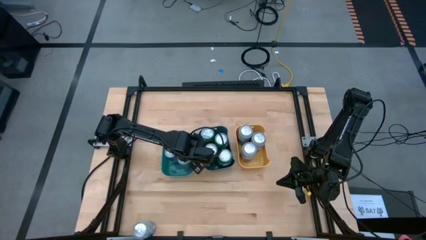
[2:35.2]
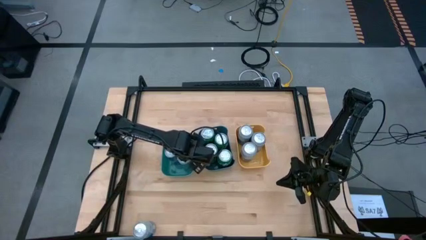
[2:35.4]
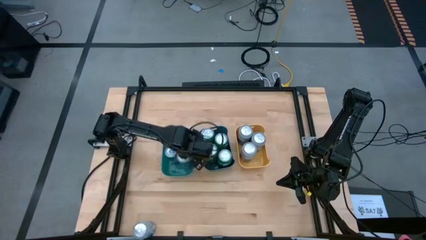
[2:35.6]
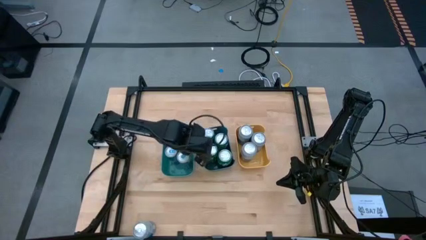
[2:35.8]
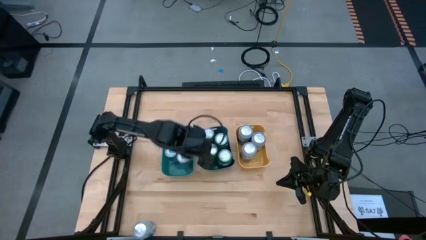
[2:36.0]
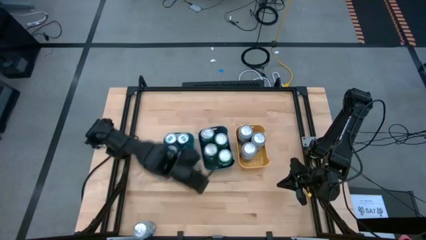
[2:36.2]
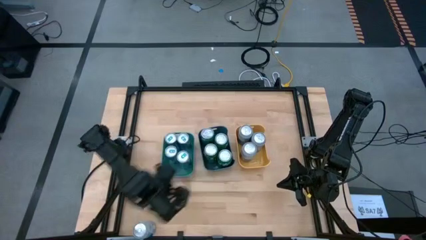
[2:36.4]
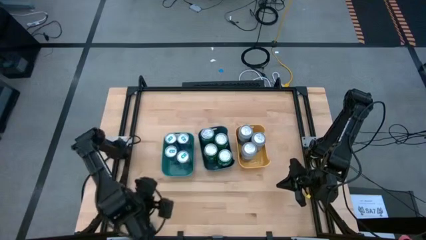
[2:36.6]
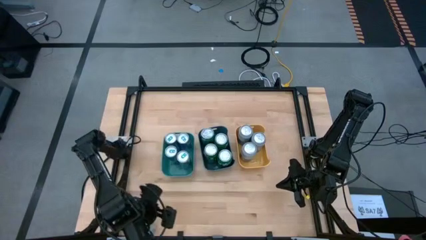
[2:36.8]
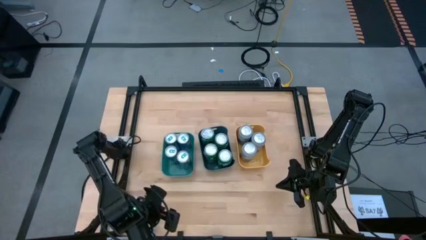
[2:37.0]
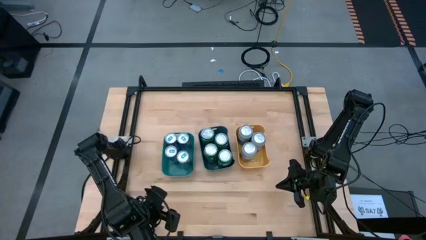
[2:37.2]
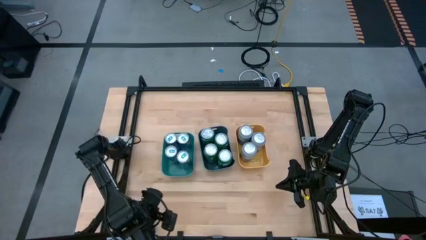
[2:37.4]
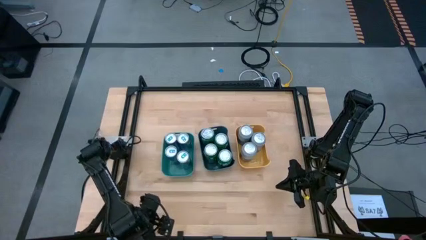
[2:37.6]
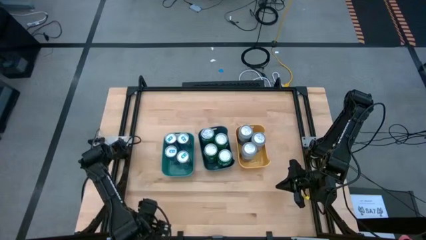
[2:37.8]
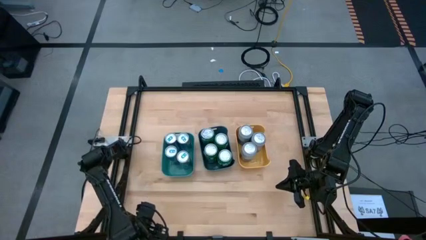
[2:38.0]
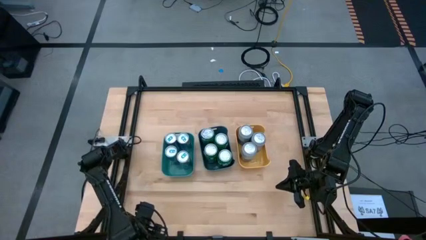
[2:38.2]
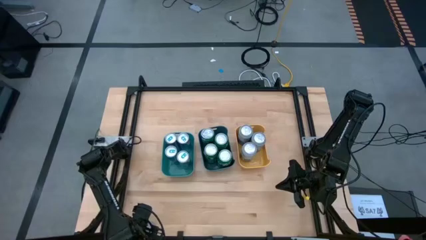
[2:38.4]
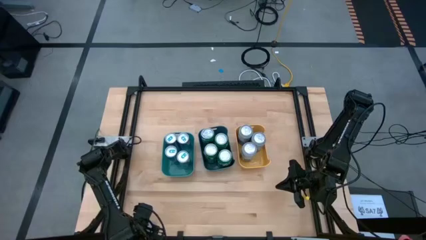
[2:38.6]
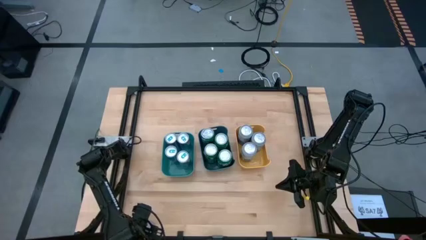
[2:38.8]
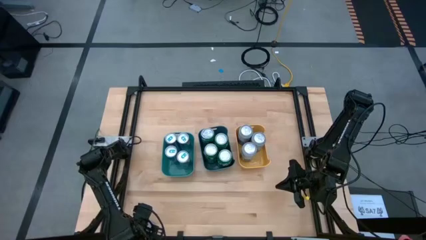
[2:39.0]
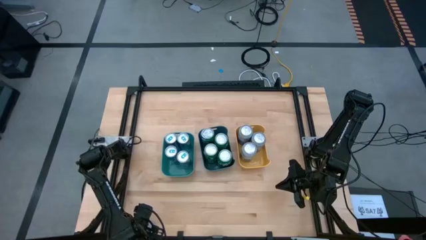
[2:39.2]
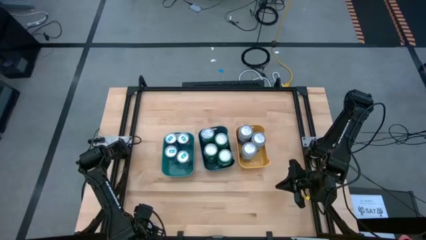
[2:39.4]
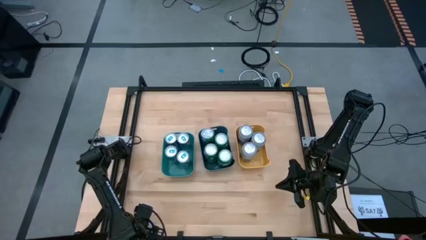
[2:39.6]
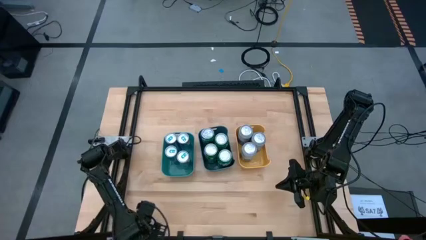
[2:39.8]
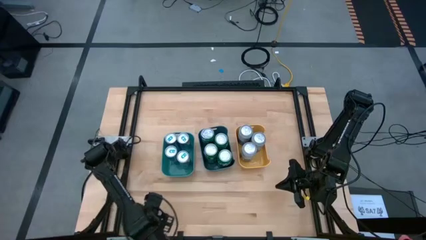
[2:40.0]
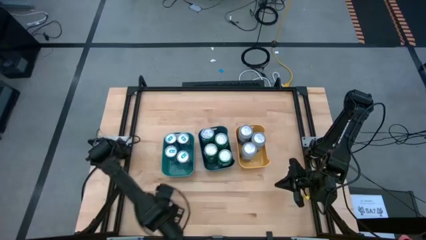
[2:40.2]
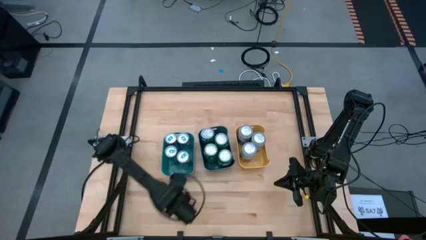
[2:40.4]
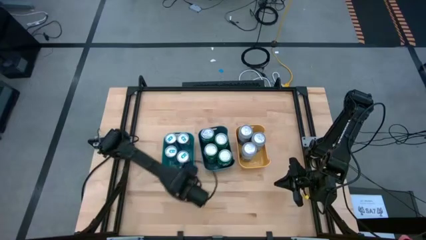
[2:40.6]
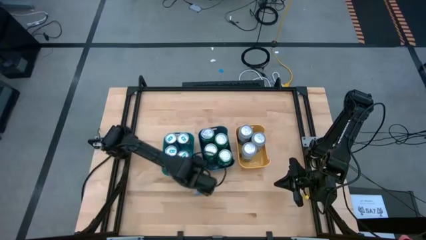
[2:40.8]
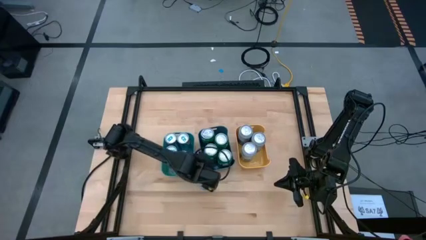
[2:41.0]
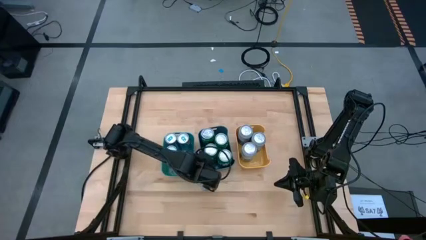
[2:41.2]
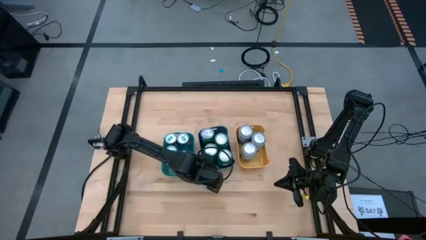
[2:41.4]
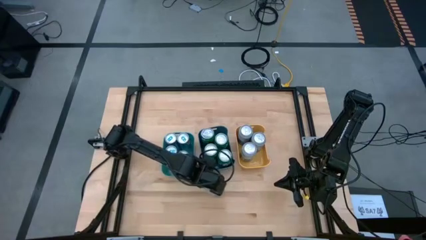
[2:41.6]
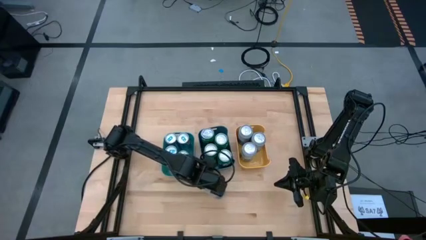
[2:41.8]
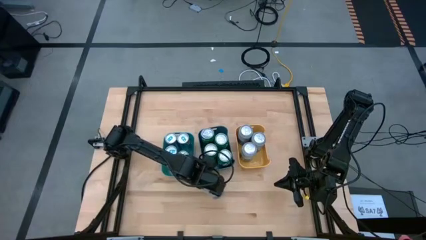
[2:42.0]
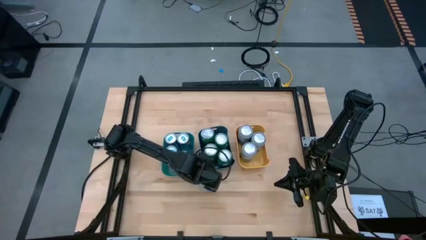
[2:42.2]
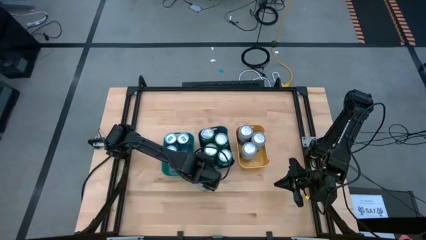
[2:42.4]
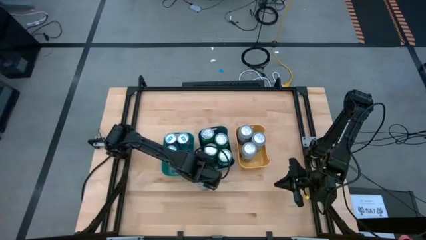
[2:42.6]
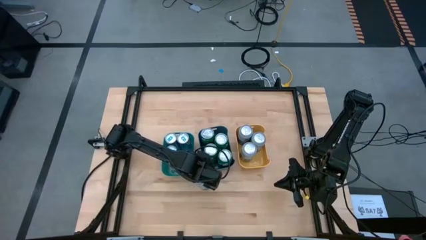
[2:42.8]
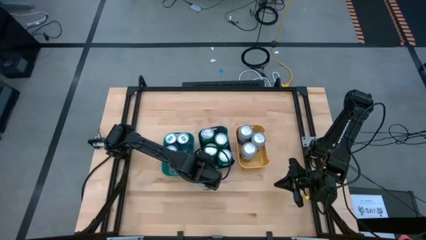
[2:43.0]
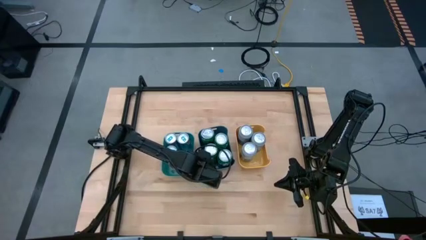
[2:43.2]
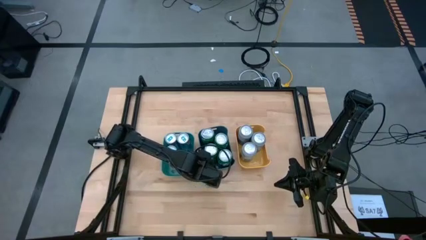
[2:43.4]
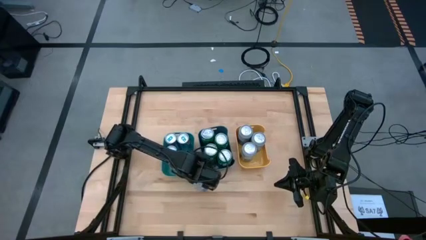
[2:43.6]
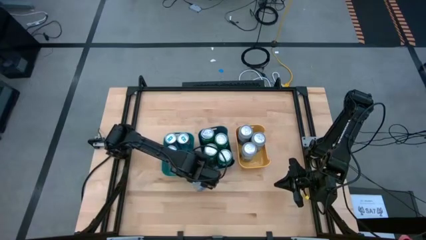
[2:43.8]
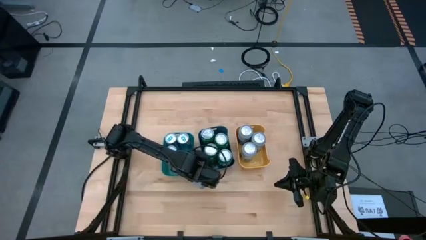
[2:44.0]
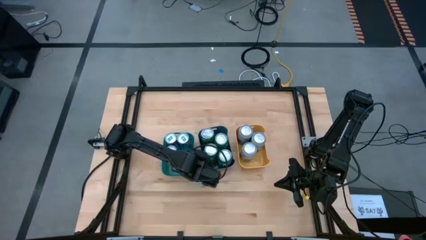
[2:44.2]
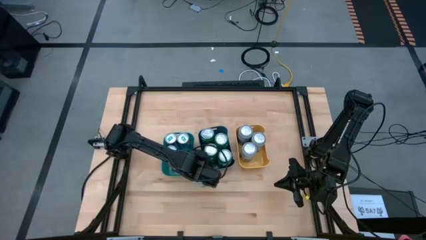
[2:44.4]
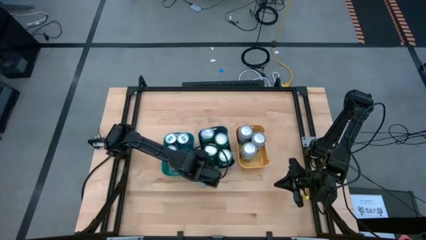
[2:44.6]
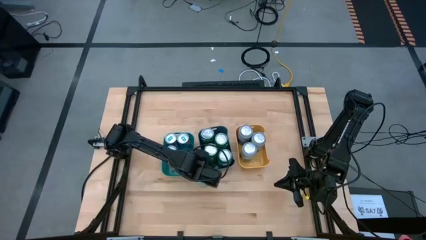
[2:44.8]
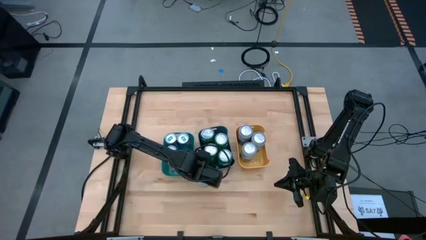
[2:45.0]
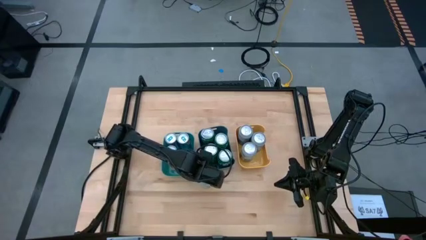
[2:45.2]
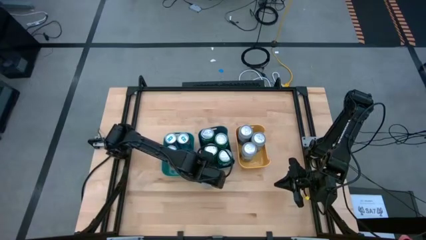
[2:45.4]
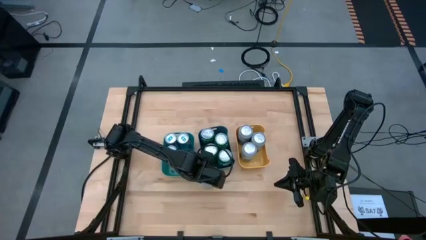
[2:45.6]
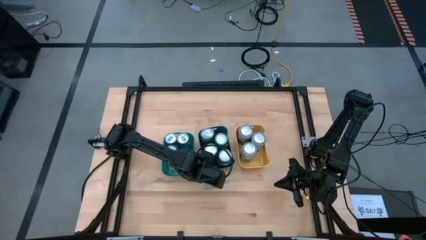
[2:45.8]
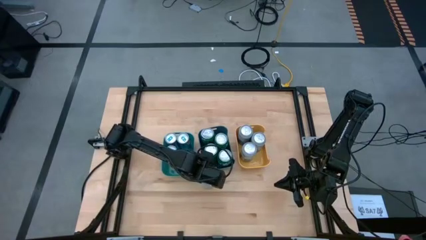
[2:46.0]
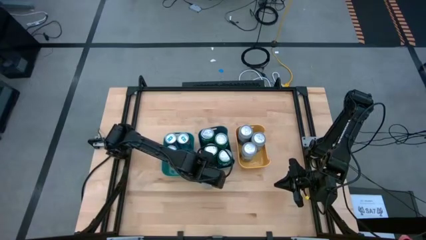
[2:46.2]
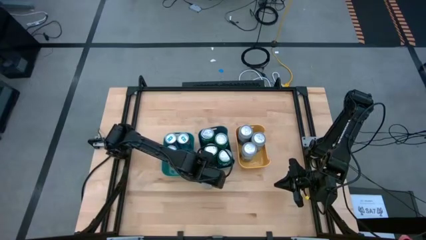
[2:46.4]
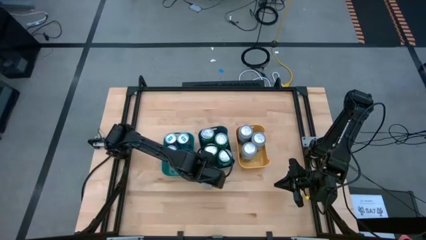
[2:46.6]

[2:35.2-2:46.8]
Task: Sort soda cans
Put the blue/white soda can into the yellow bin

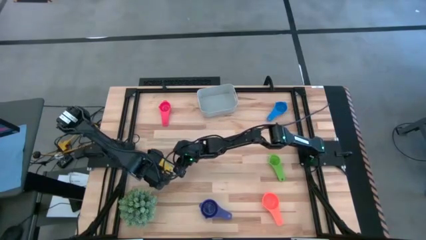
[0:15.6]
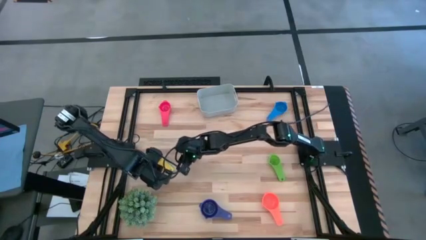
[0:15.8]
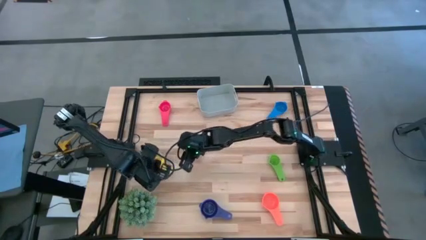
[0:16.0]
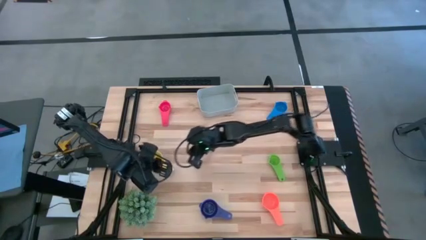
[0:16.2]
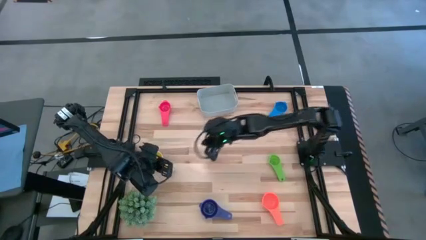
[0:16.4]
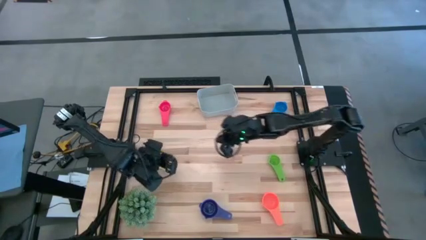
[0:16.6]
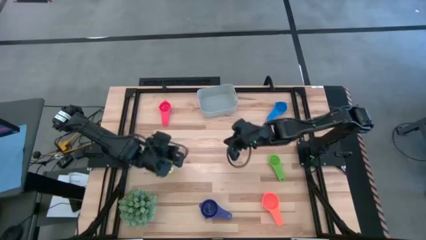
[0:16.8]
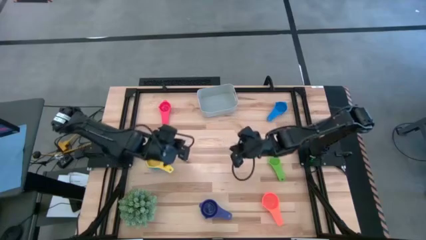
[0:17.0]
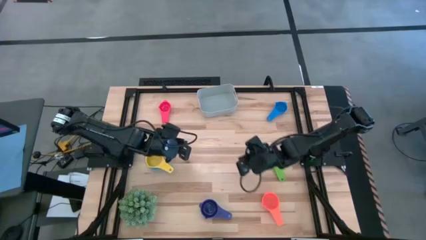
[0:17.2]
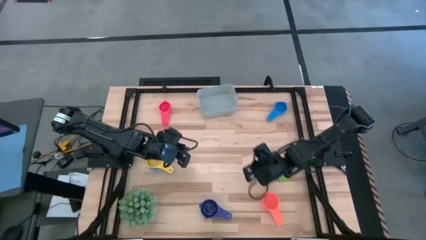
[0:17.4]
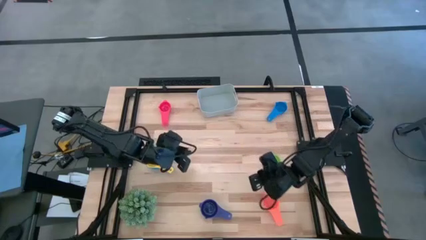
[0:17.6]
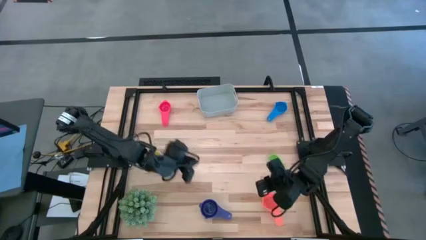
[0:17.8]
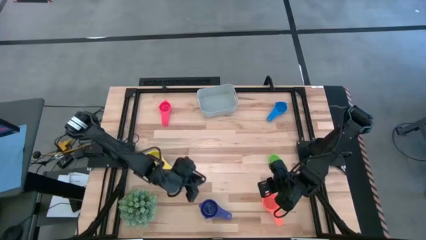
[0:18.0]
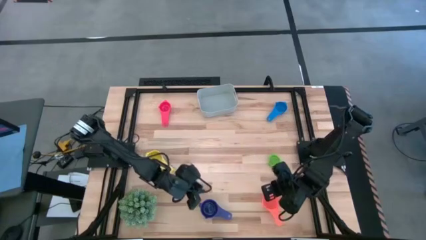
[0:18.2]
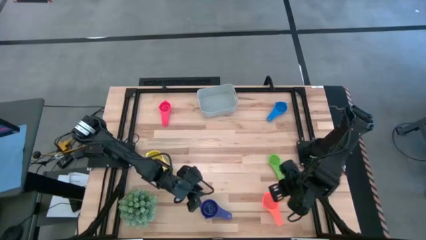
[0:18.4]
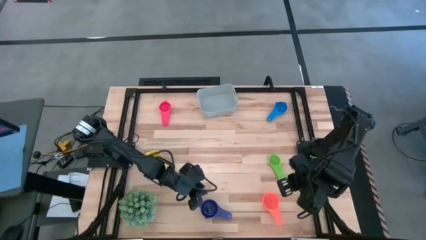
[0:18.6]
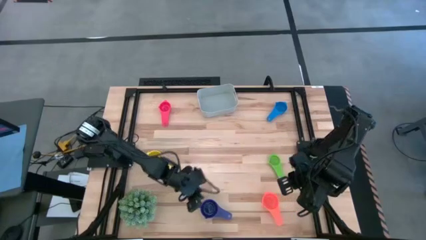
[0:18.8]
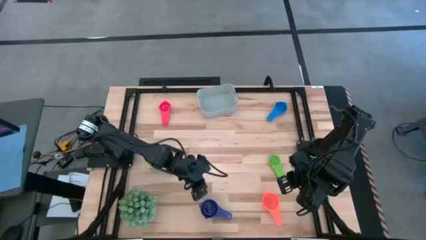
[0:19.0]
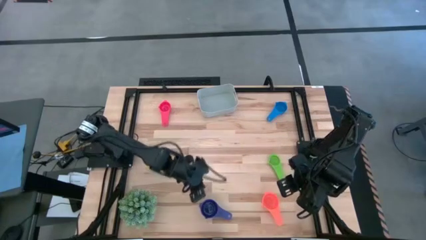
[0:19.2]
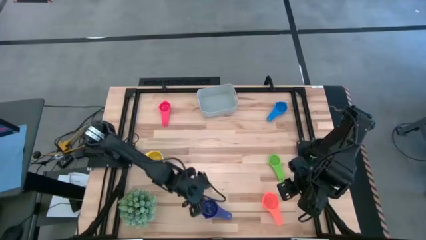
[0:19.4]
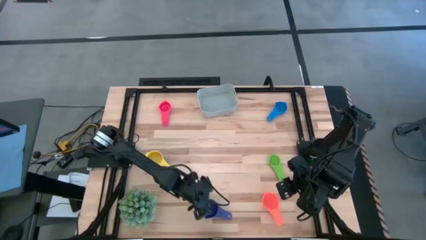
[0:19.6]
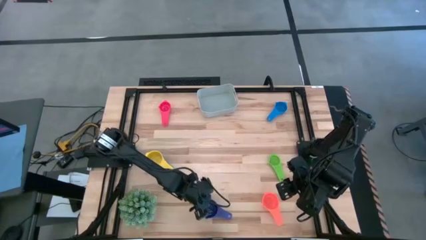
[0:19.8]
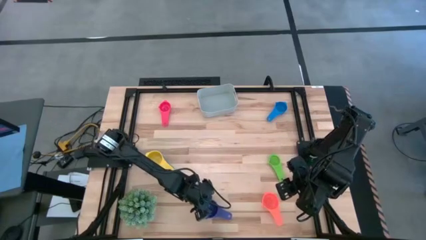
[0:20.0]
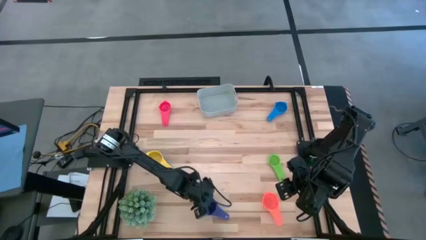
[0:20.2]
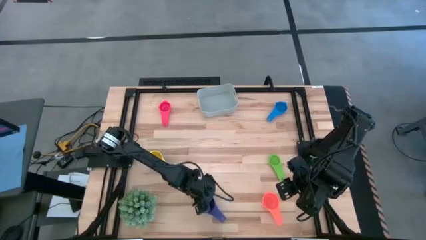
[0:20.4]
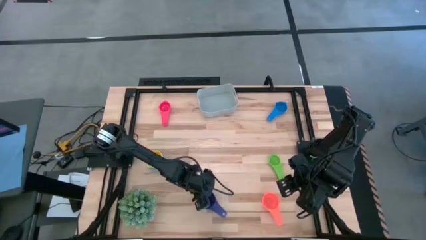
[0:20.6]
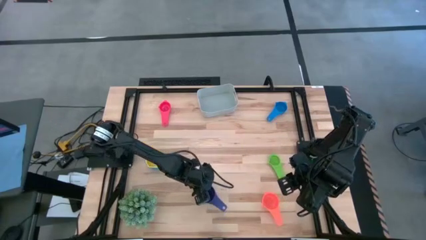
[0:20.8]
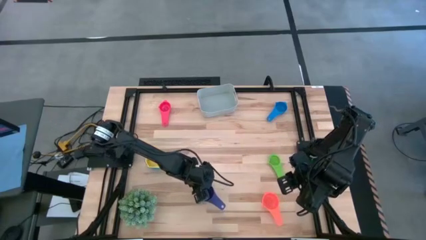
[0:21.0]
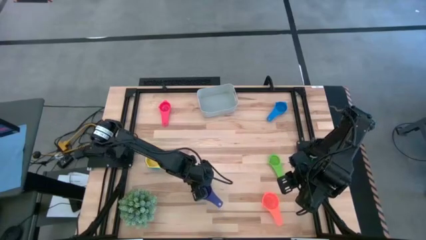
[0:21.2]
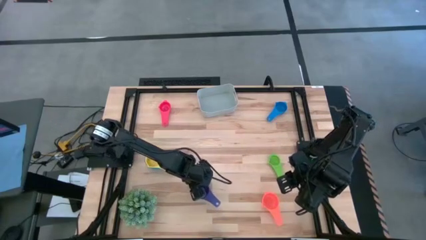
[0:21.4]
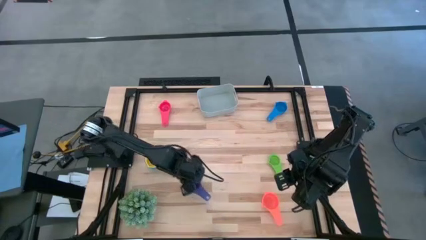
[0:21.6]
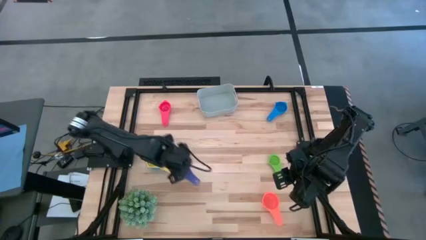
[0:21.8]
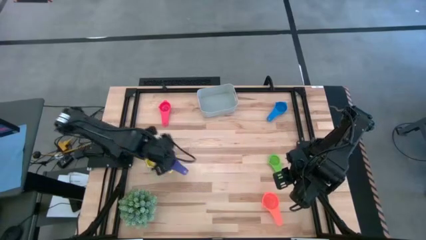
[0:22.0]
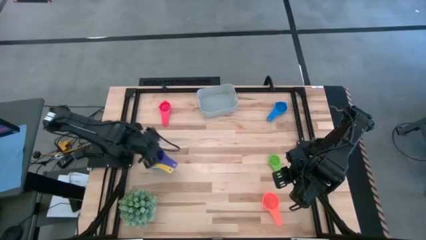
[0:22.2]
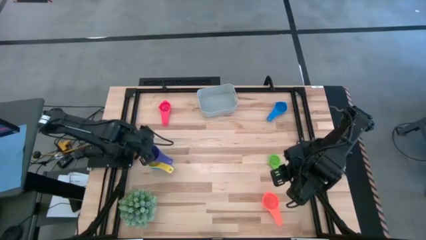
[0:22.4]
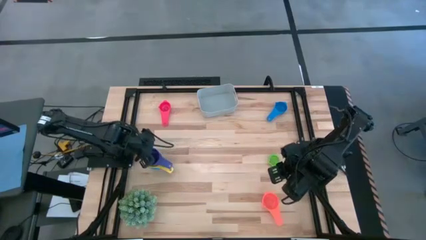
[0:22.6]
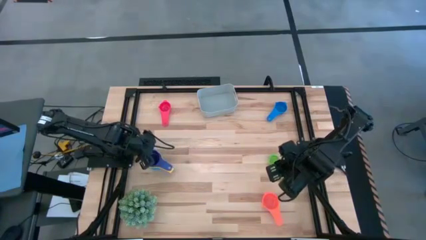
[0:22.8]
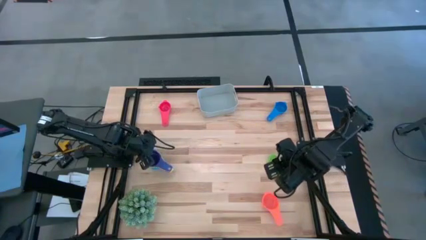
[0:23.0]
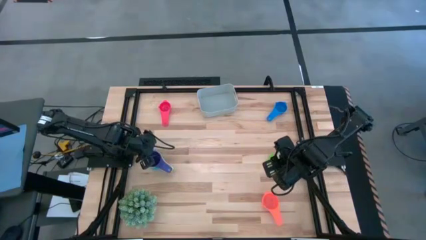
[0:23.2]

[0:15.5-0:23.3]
Task: Nest measuring cups in basket
Stack the violet measuring cup on the yellow measuring cup
